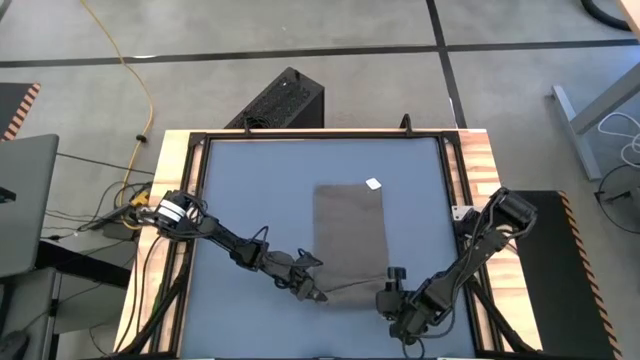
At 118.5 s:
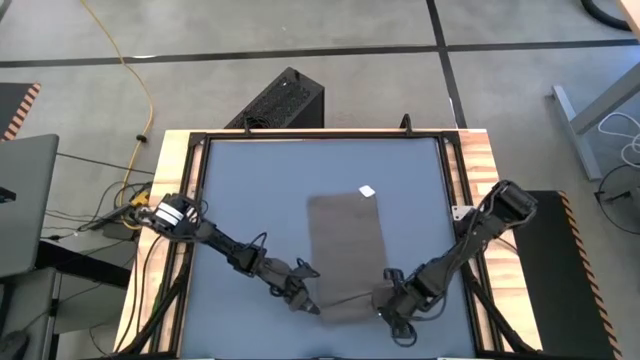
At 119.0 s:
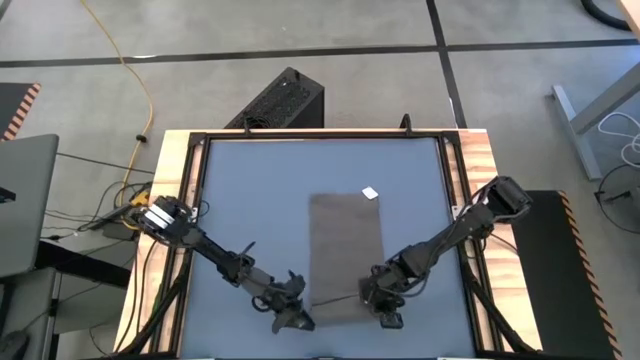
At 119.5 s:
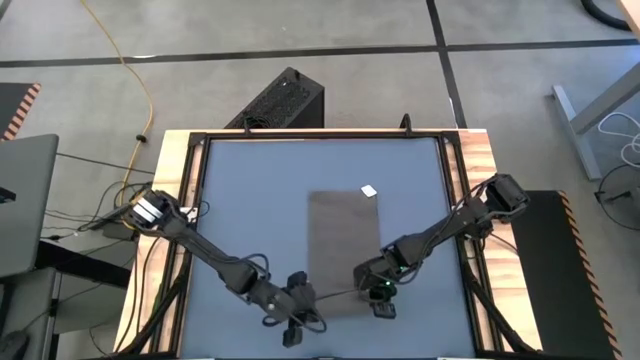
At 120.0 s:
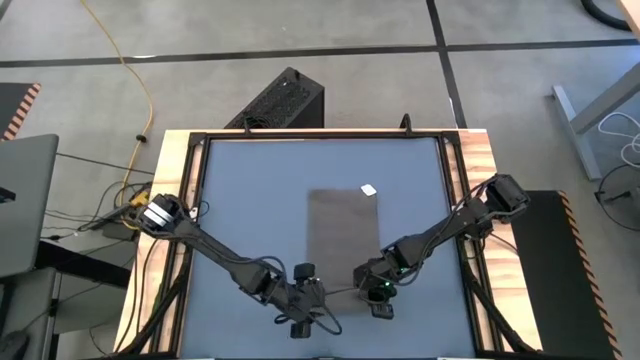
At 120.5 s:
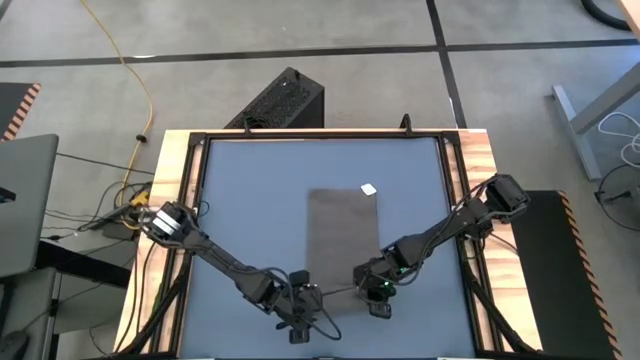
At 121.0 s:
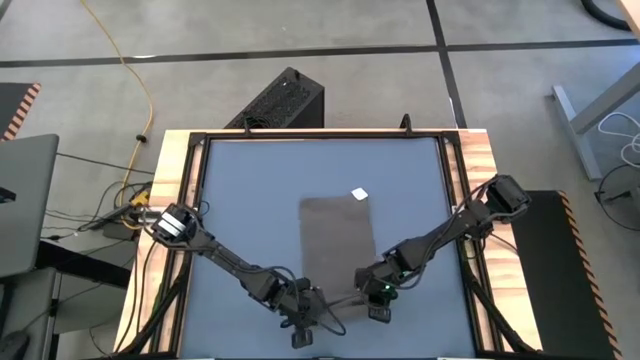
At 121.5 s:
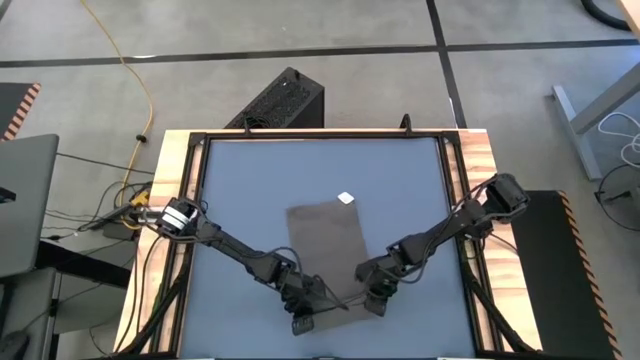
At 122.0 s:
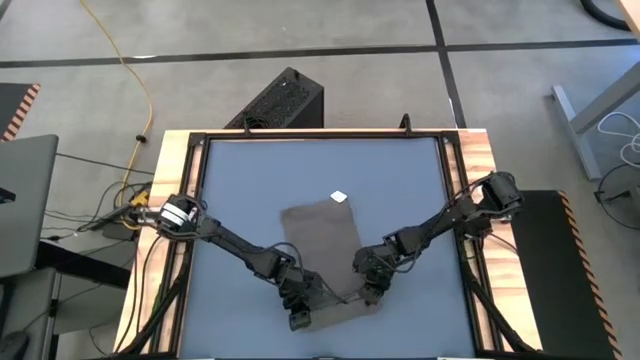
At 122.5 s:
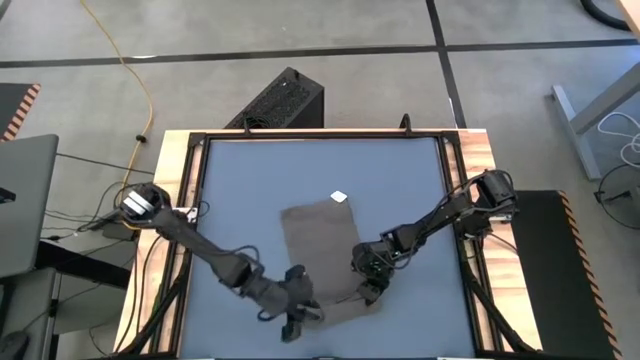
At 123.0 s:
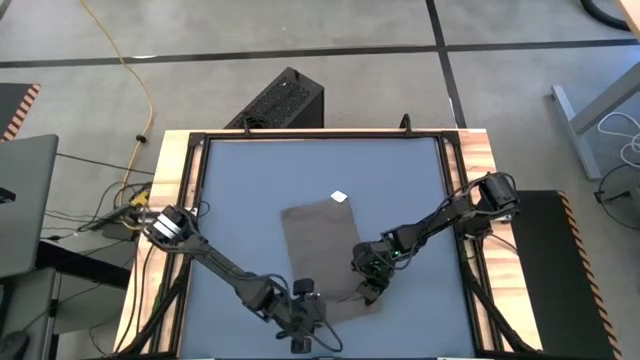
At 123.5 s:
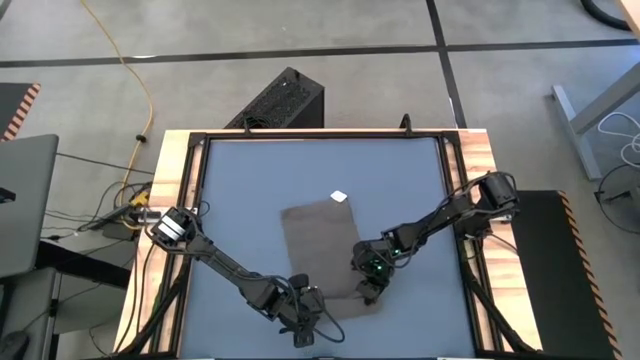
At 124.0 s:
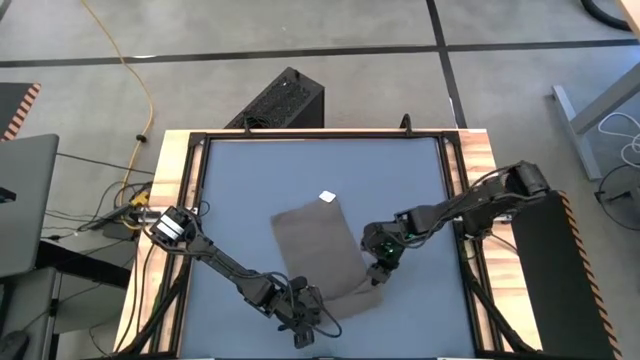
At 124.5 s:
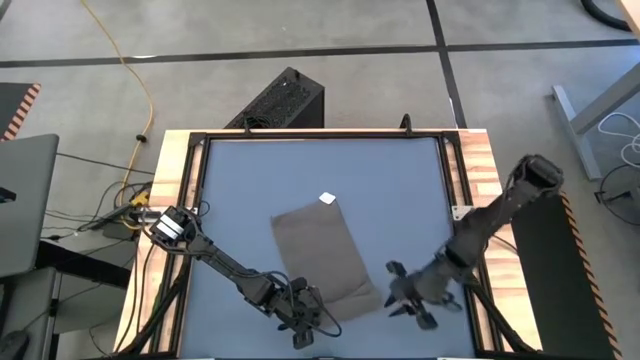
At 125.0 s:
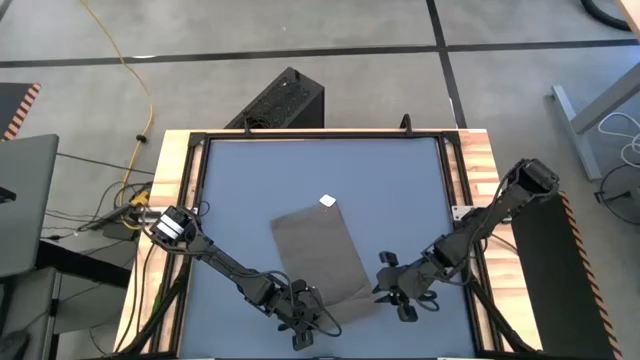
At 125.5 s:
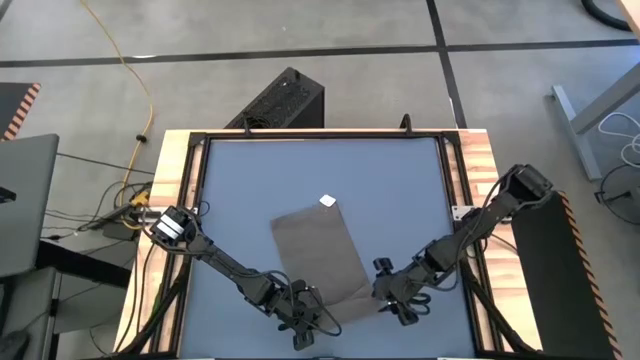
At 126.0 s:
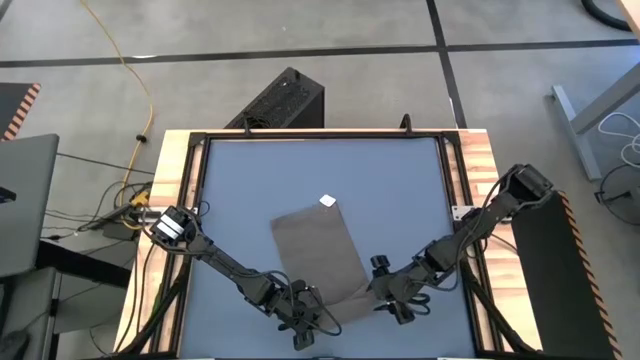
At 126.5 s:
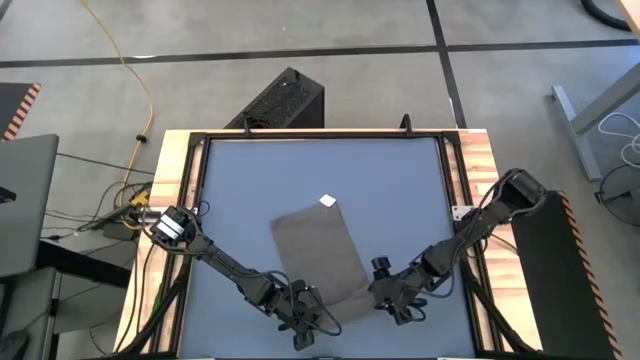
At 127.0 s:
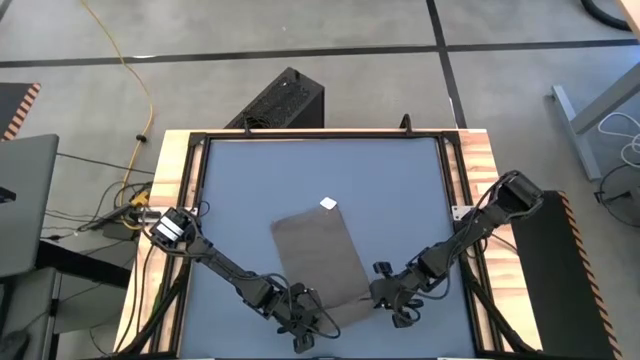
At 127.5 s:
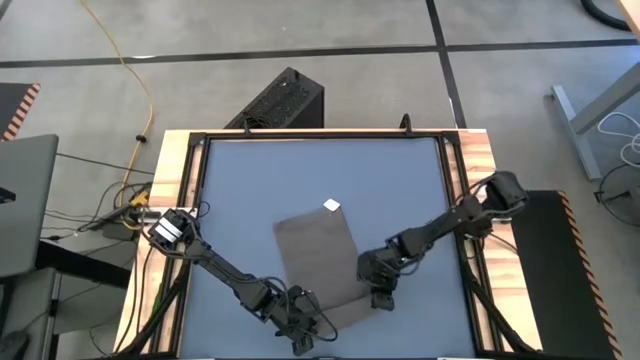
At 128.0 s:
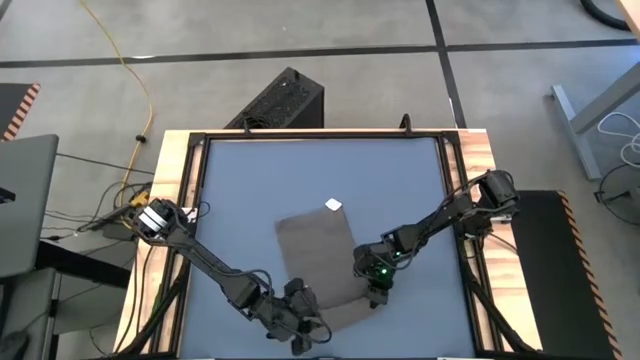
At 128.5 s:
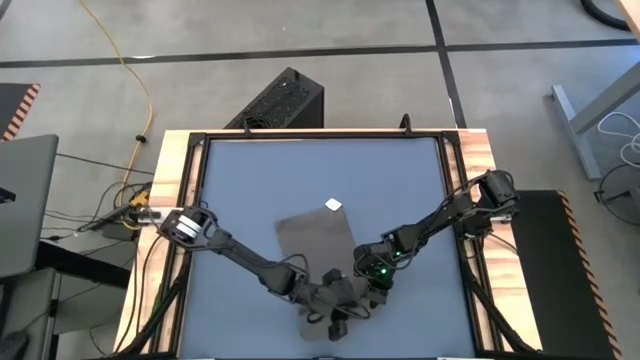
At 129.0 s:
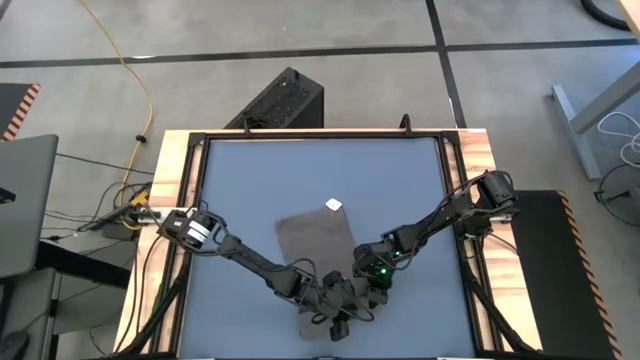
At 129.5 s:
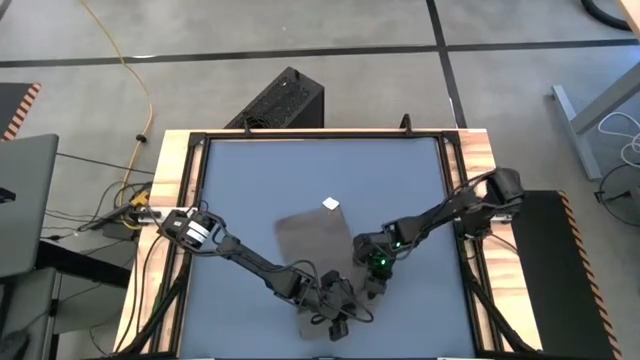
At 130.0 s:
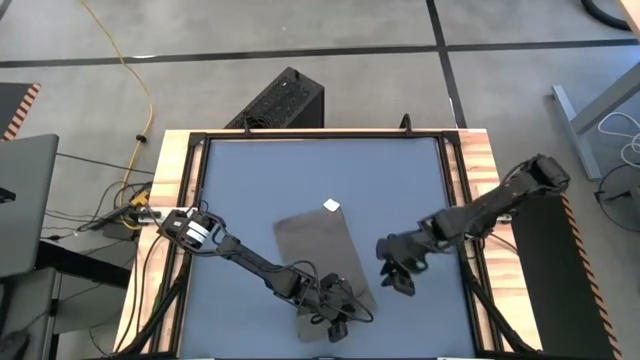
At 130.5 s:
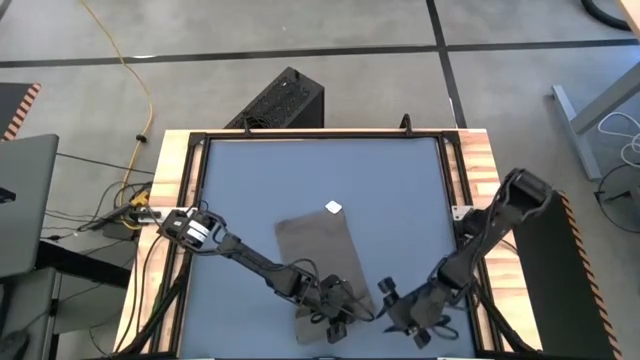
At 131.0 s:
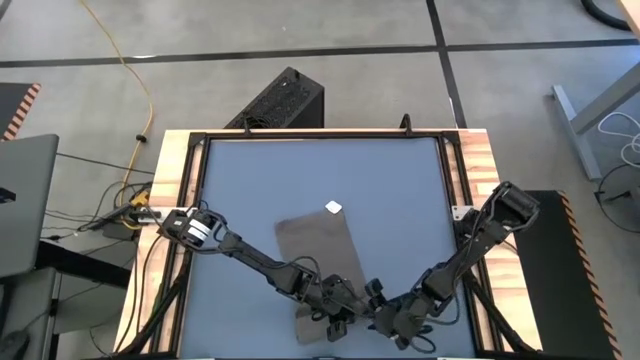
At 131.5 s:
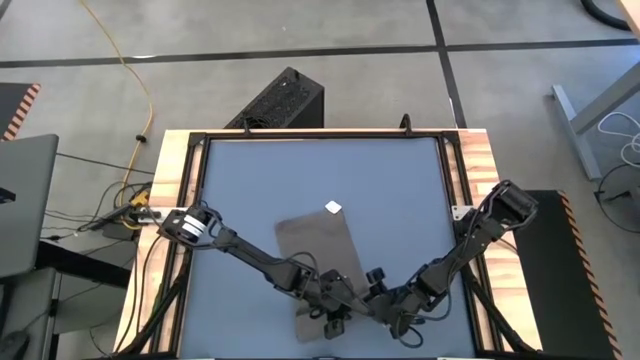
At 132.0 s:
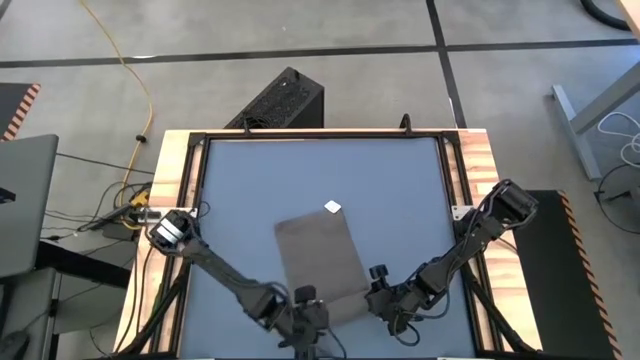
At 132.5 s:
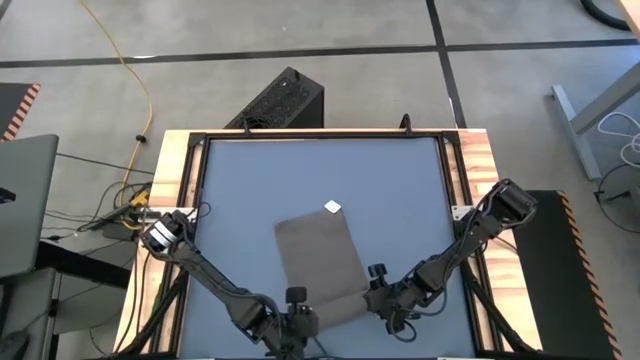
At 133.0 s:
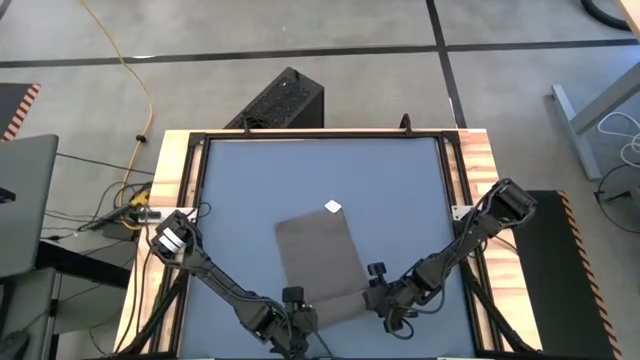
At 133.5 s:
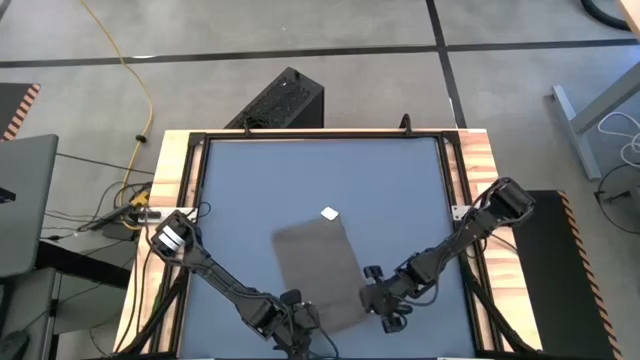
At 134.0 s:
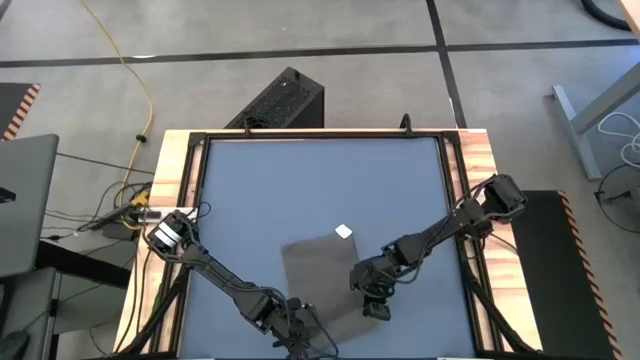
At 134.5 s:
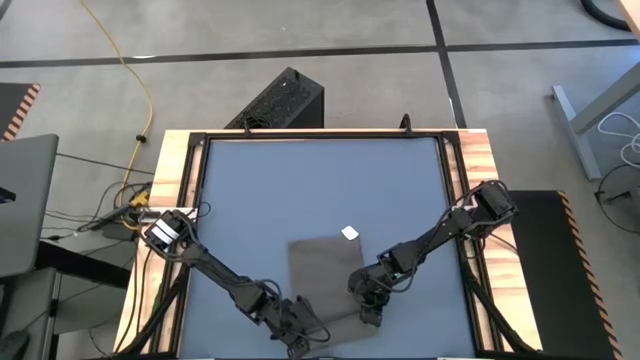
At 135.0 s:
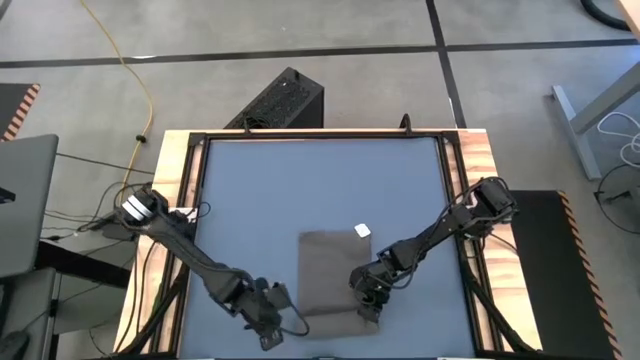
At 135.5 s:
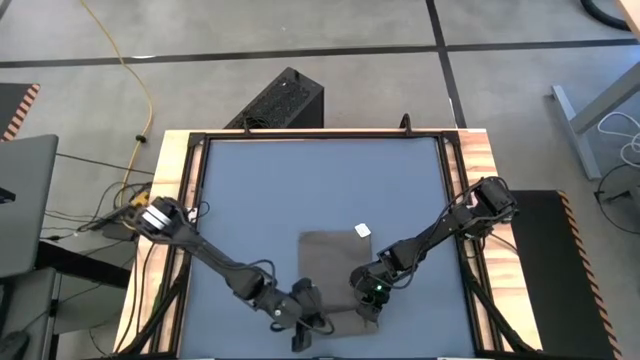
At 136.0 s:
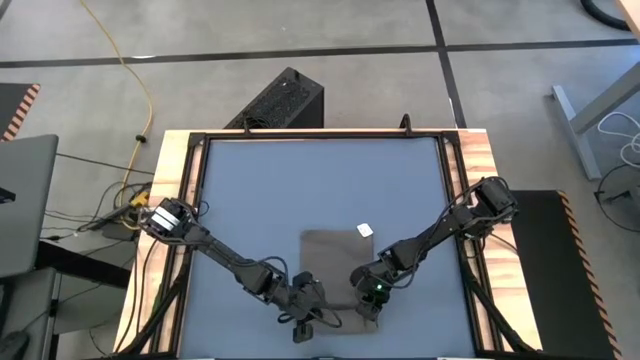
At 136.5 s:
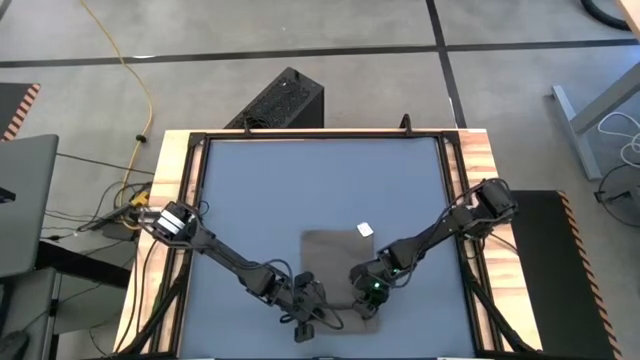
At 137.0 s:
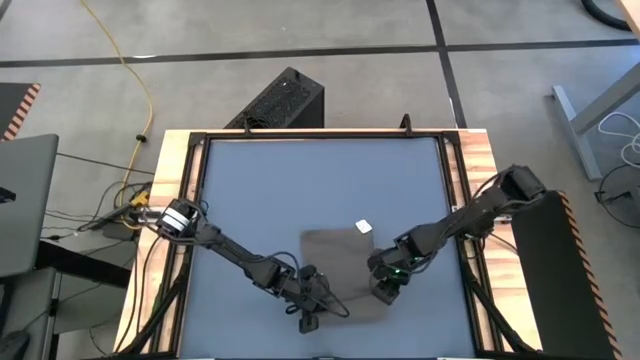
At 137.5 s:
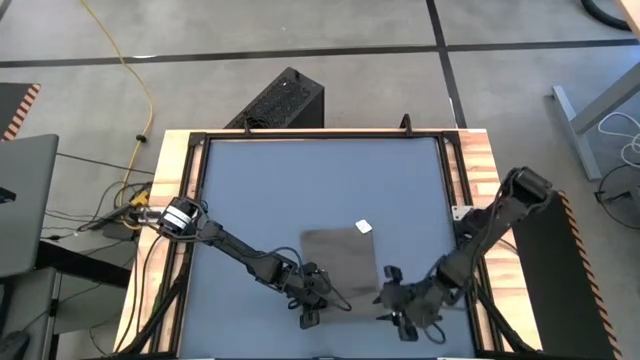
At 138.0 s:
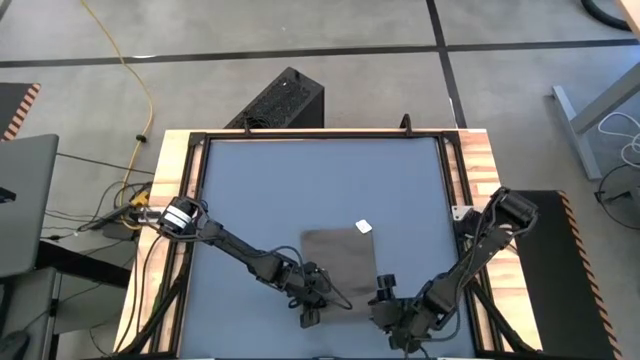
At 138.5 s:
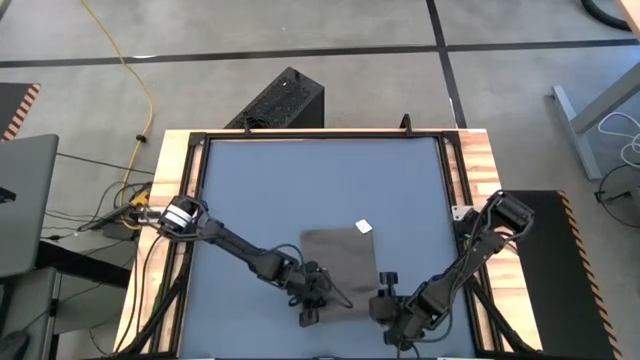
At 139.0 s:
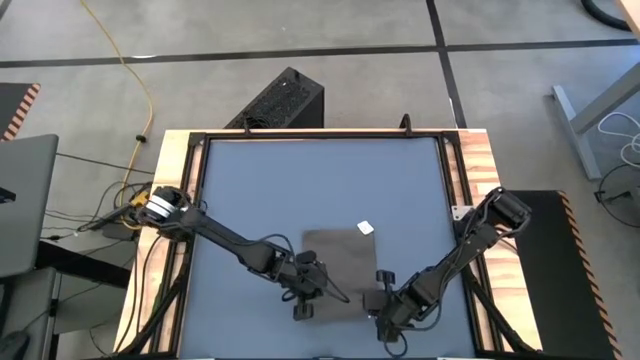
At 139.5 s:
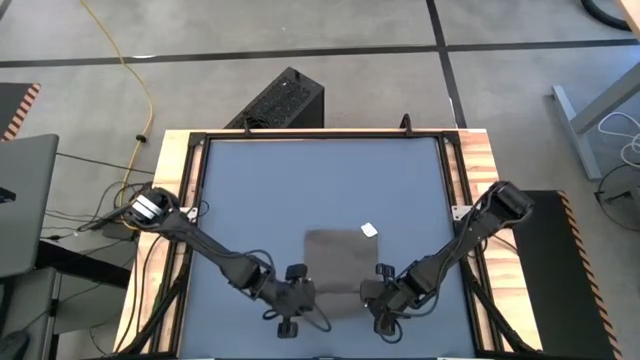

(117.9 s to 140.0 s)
Task: Roll towel
Roll the grey towel
